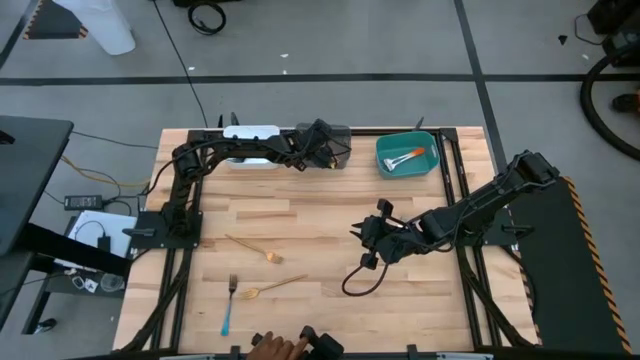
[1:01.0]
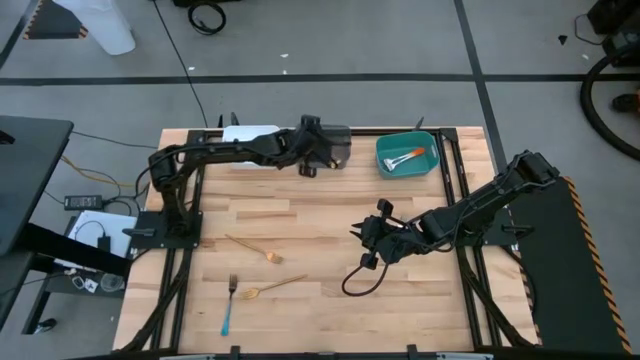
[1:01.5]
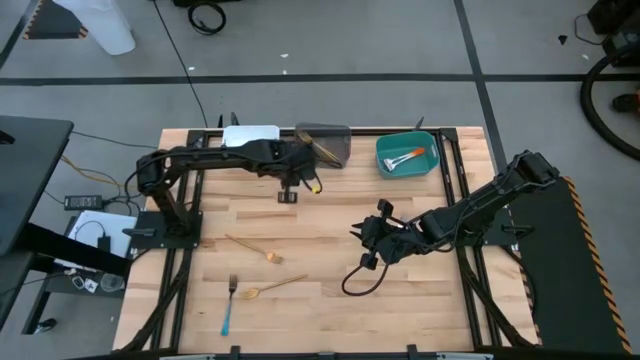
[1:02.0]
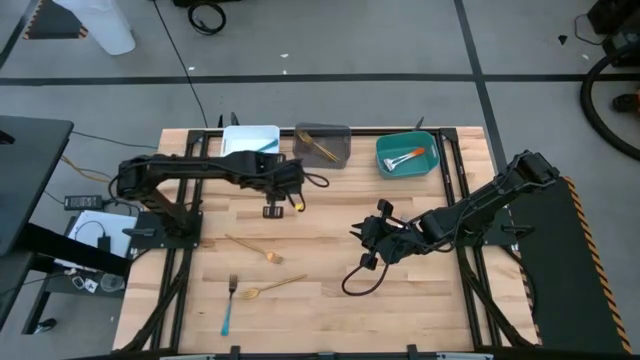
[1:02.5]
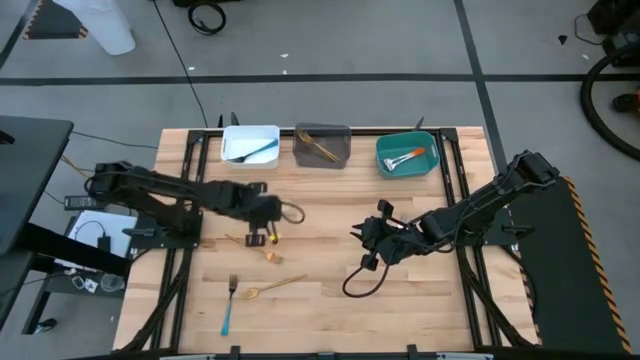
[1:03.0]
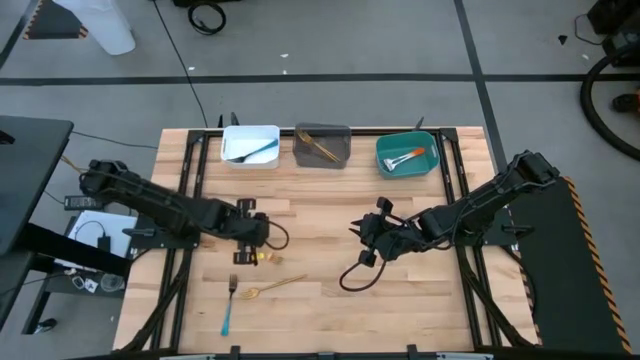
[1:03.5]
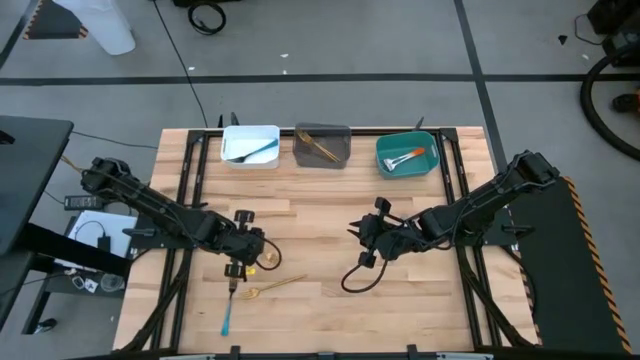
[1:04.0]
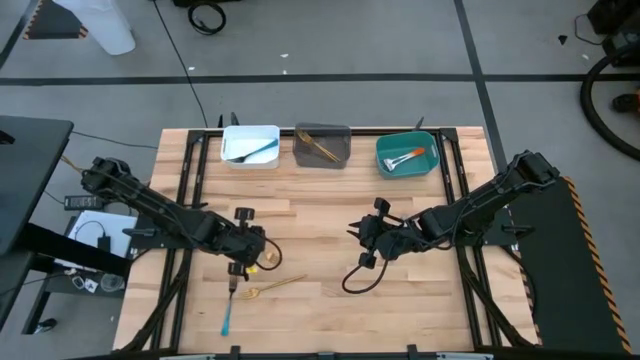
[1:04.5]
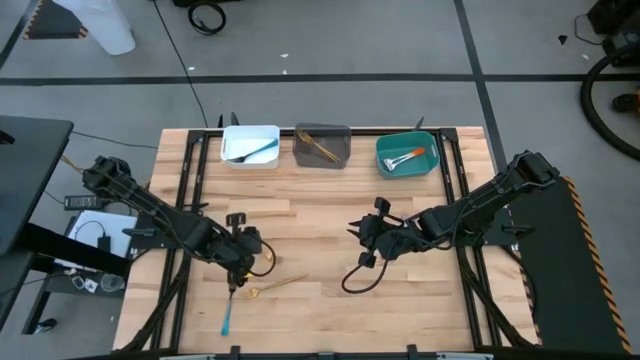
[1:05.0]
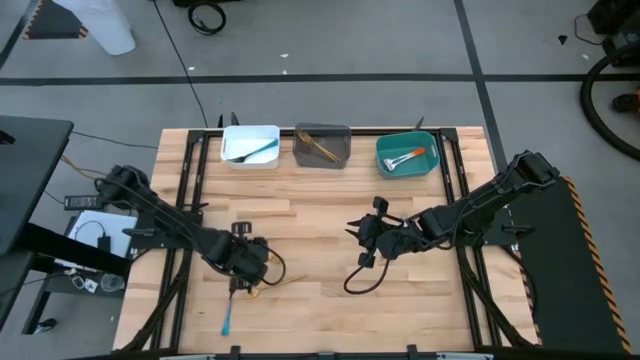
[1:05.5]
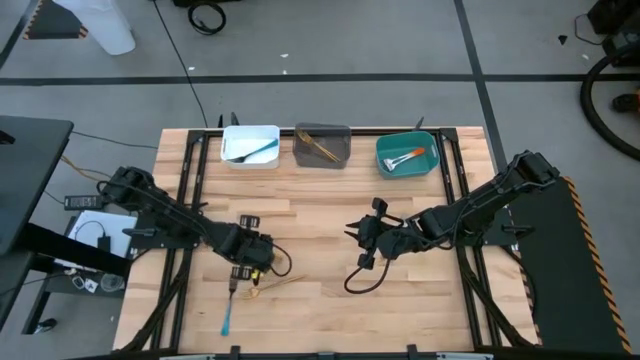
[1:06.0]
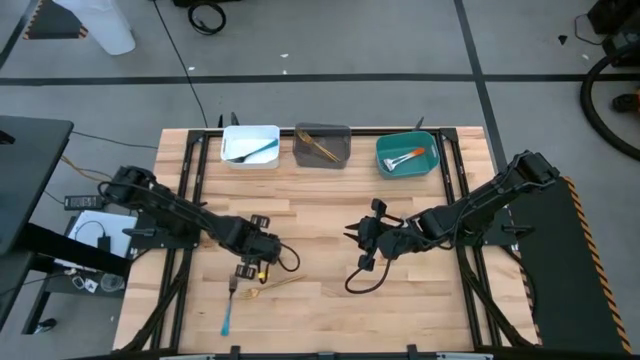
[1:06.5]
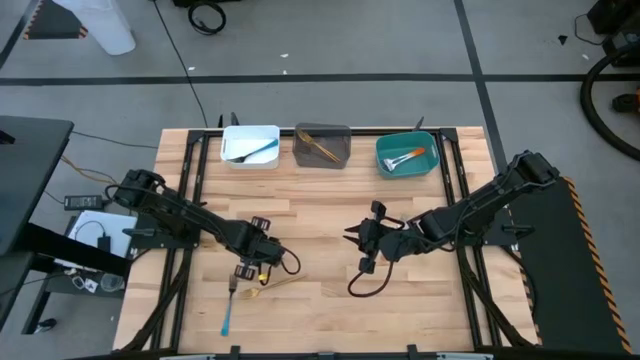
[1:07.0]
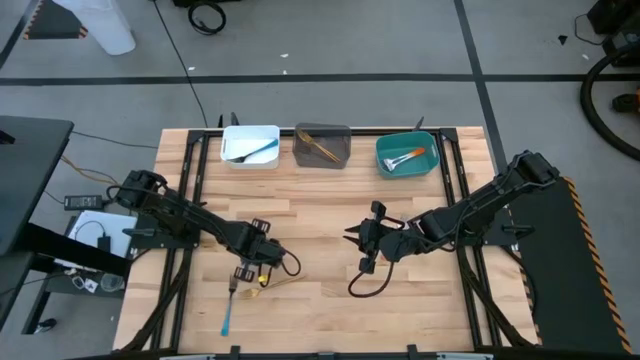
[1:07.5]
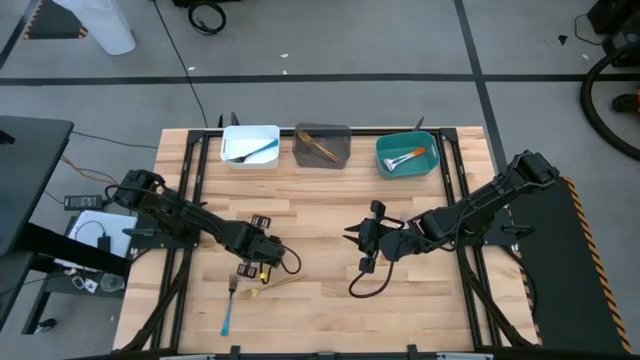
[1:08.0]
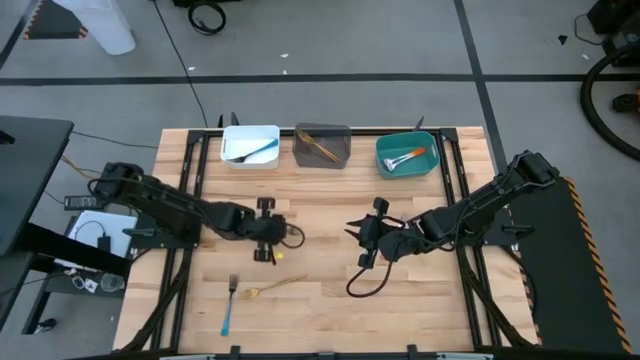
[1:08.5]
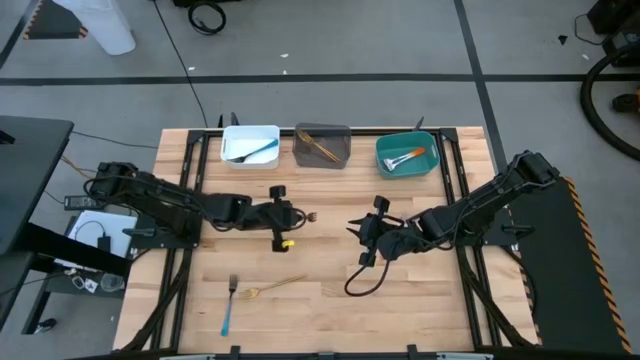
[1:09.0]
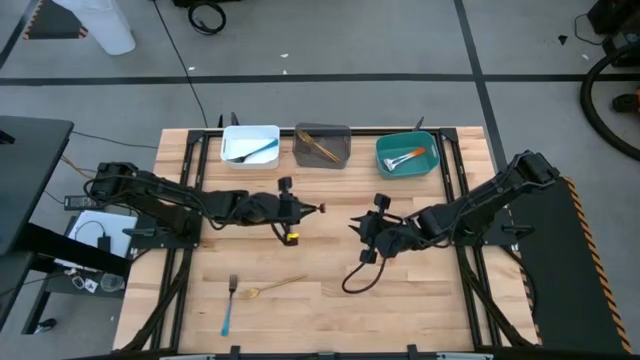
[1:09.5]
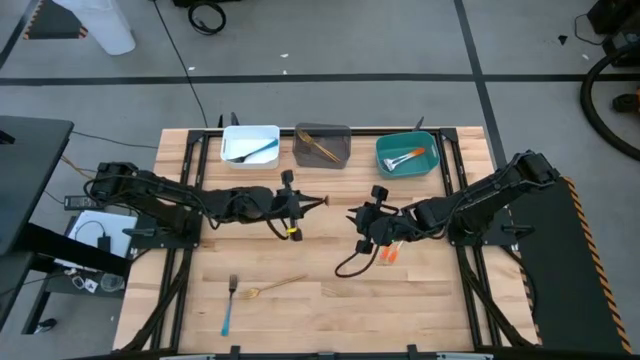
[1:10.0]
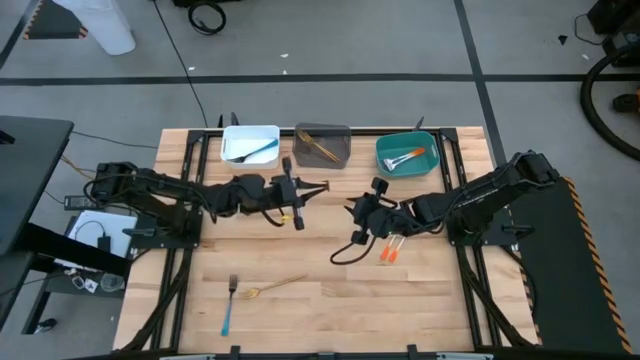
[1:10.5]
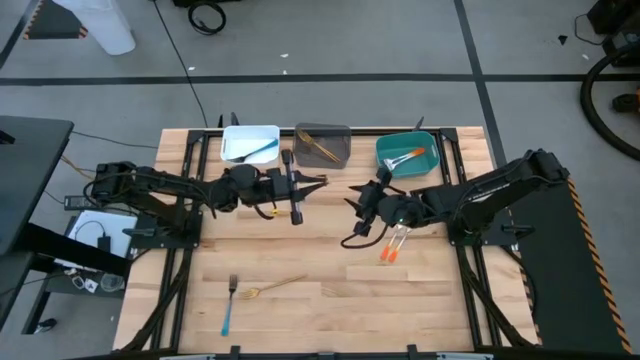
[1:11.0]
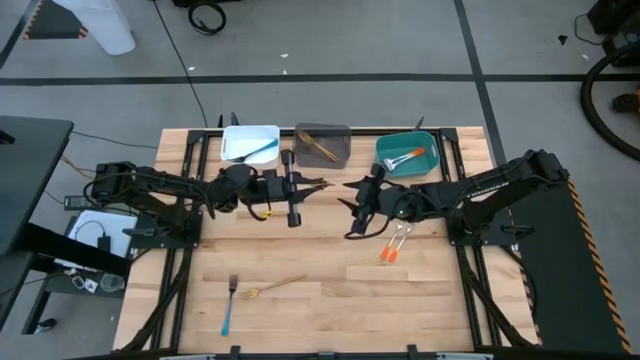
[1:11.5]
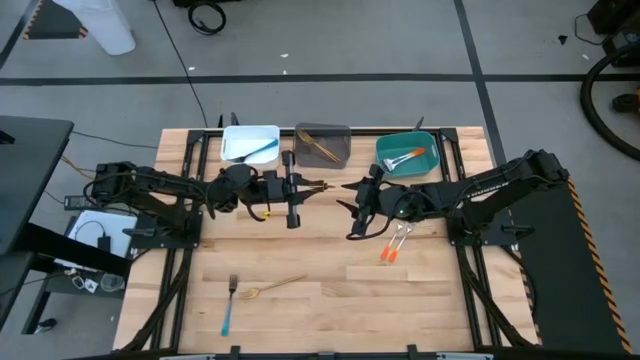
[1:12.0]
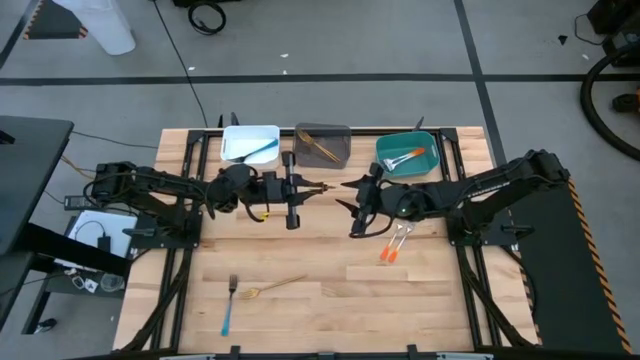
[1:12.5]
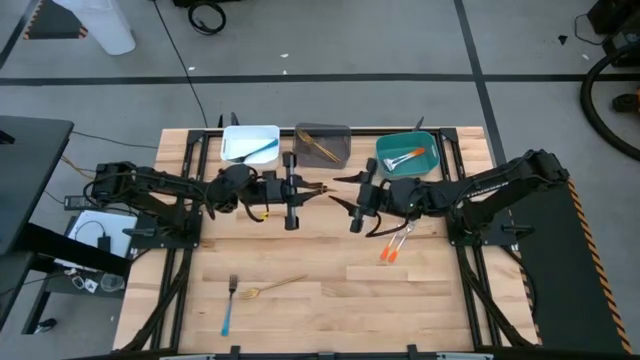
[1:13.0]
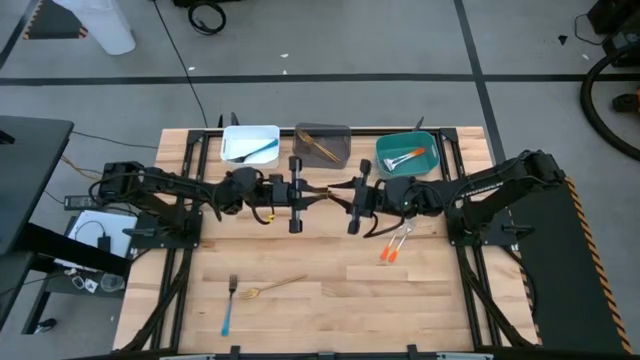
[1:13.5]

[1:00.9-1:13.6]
Task: Sort silverware by color (type)
Put the top gold fork into the black bin
